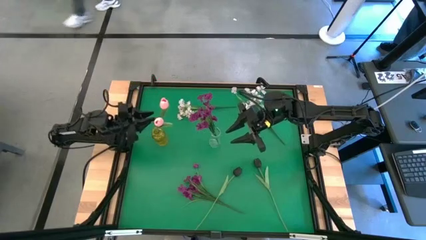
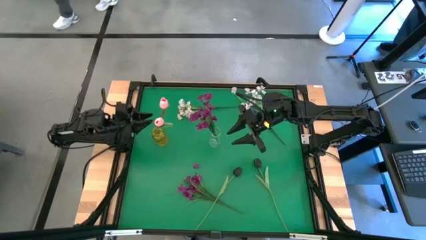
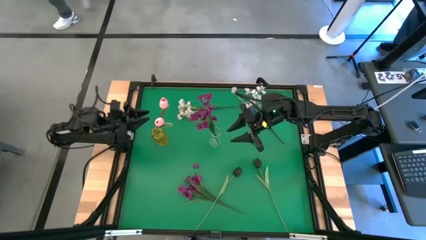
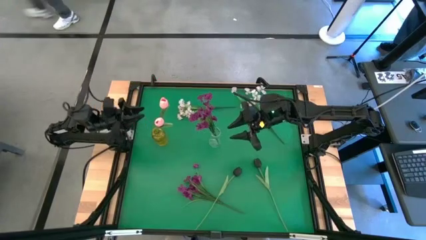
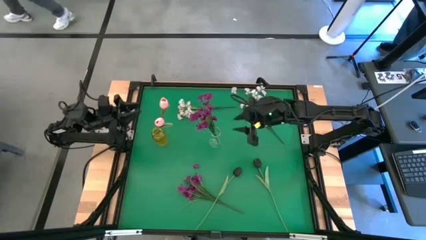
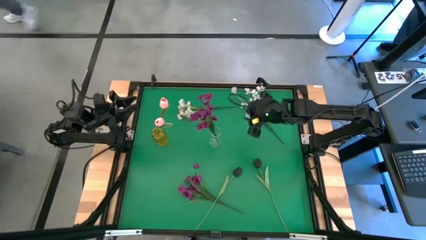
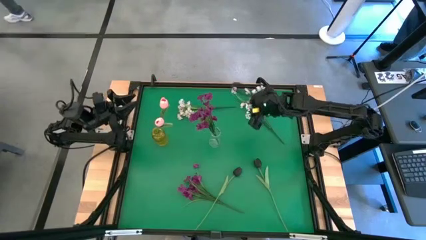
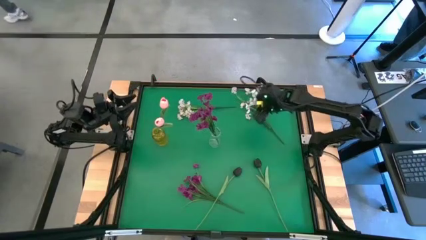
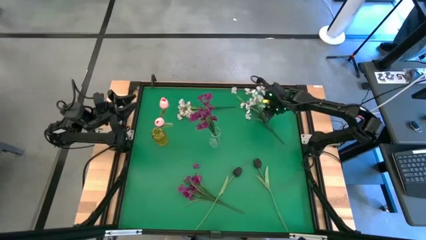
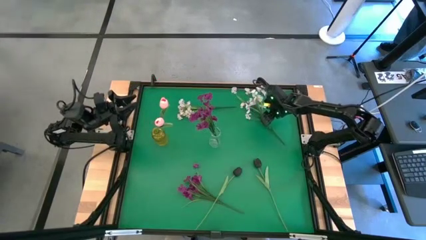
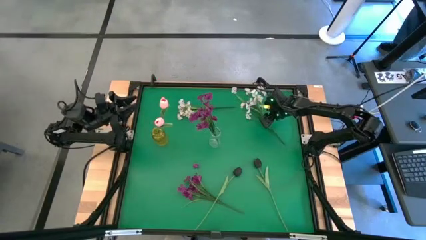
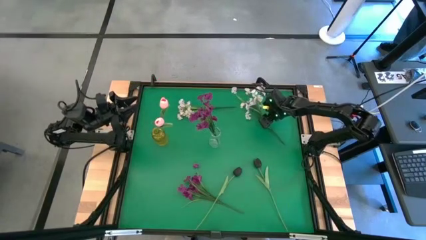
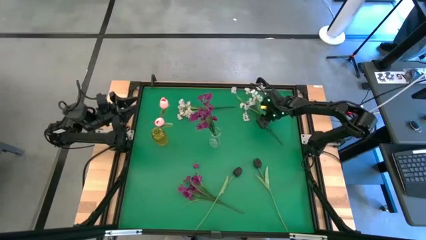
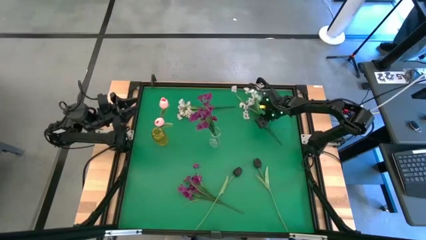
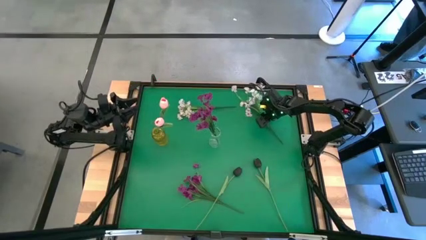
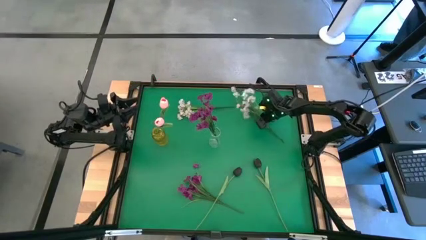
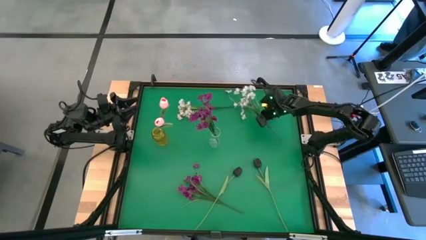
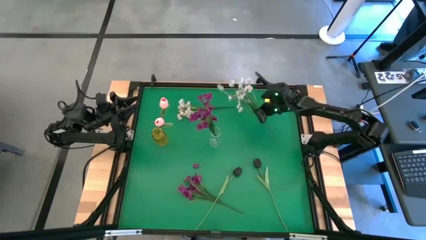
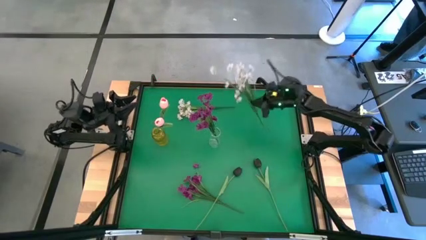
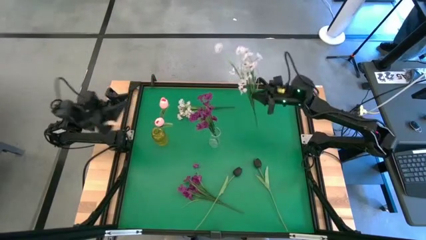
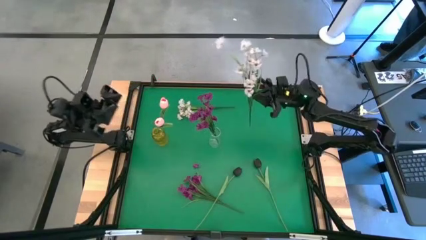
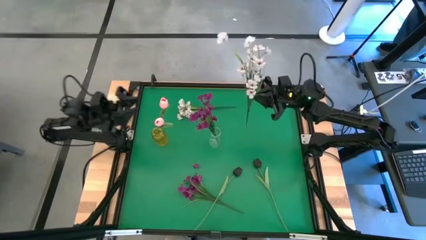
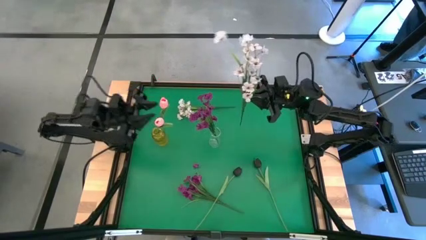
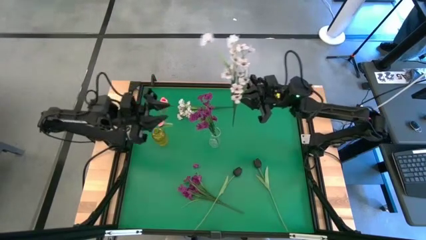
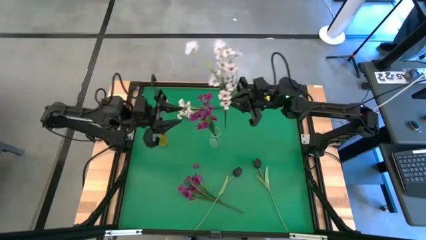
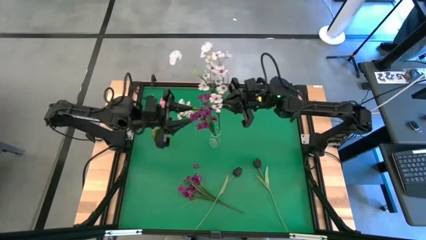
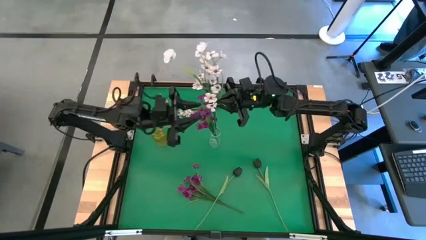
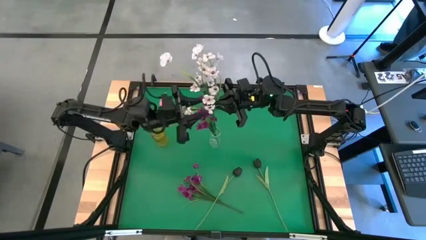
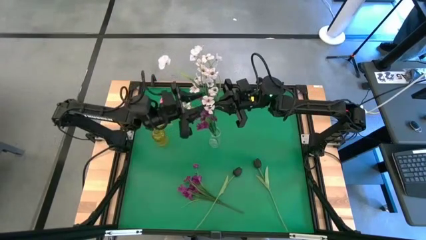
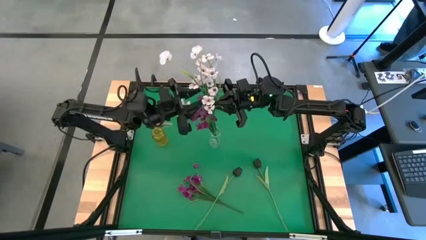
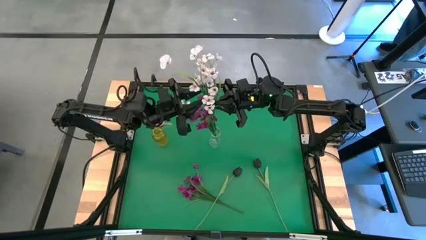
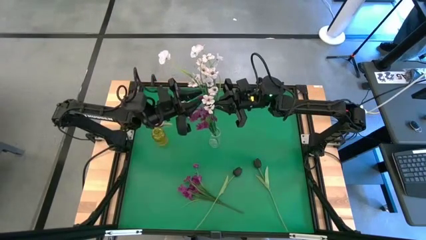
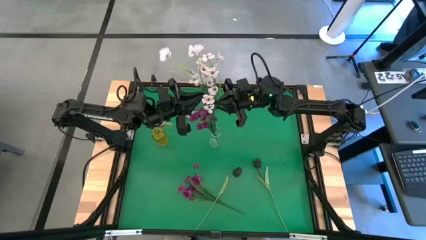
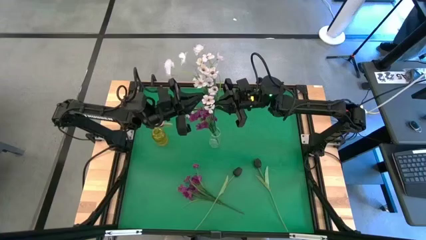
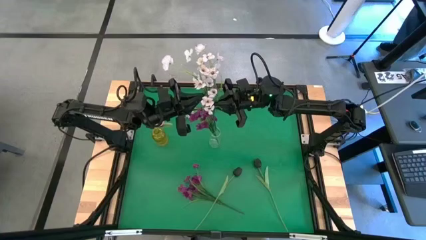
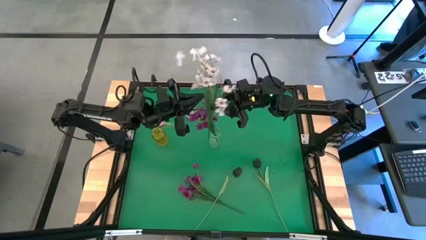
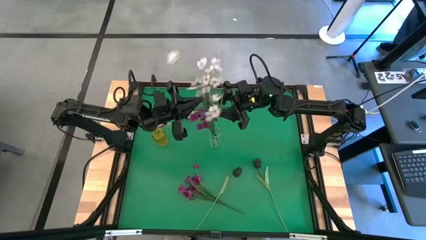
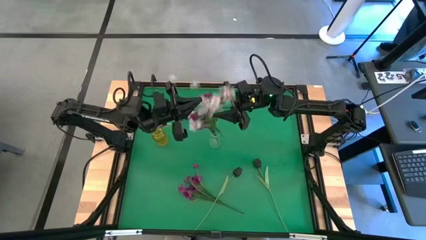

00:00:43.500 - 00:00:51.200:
Task: Sort flowers into vase by color
Put the right white flowers into the yellow vase

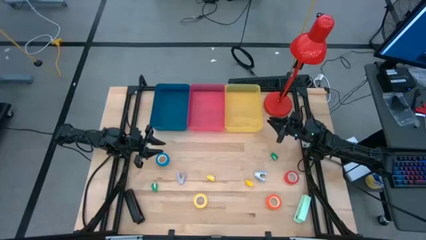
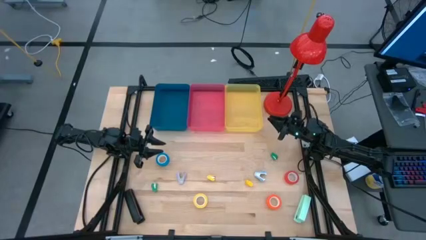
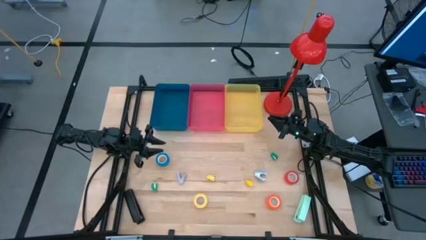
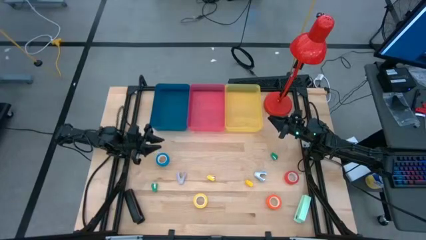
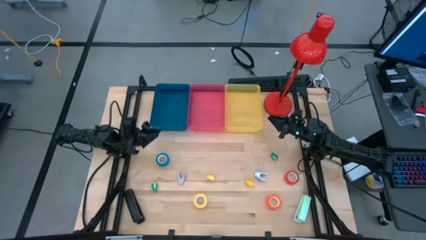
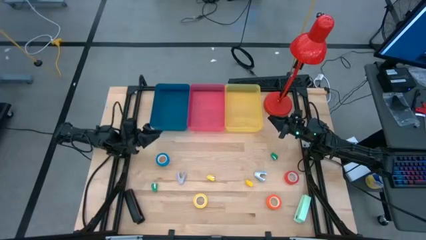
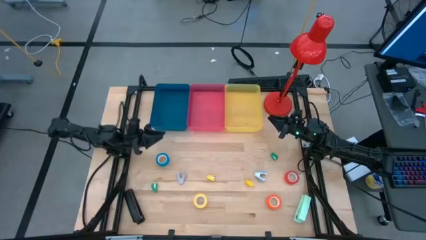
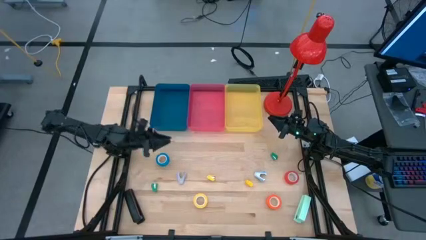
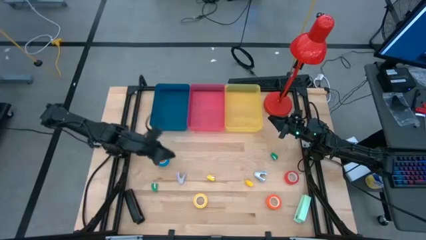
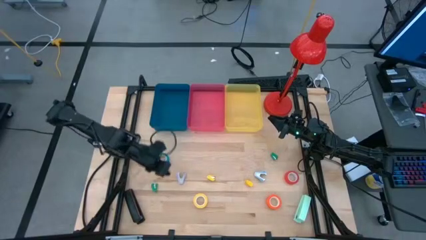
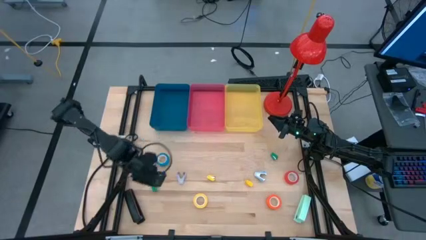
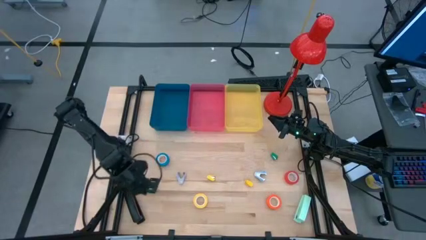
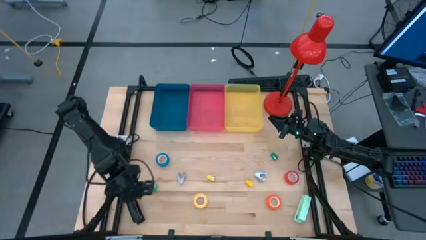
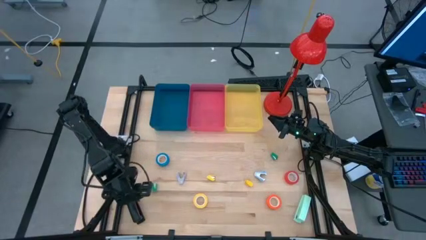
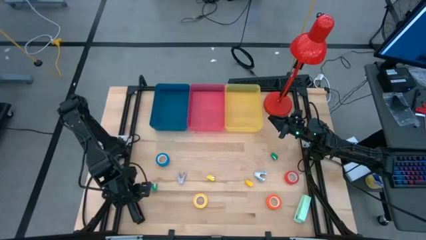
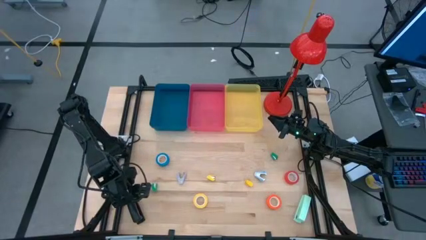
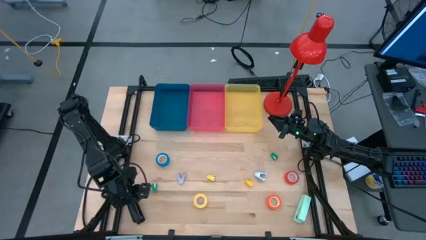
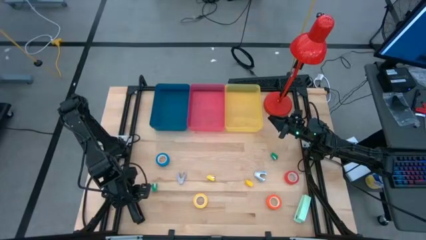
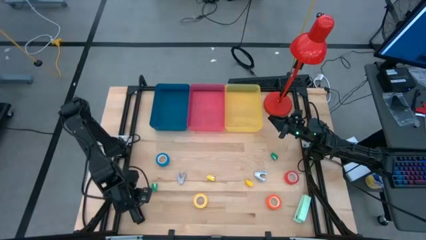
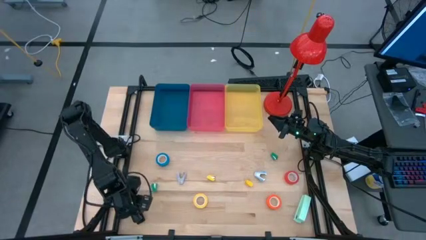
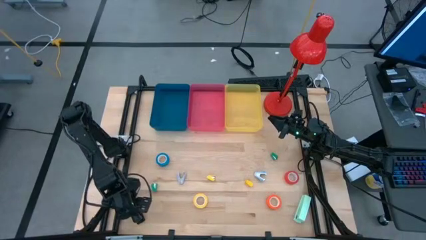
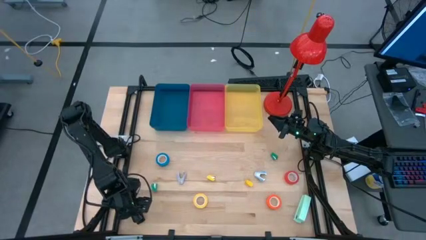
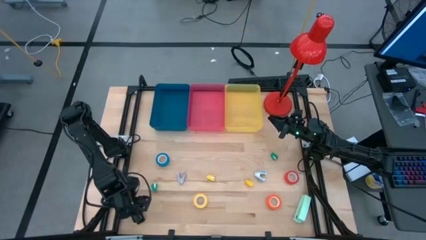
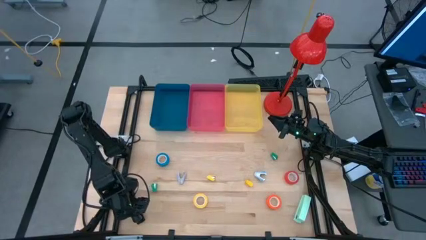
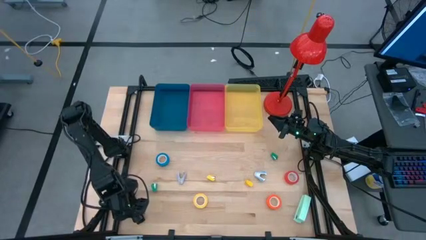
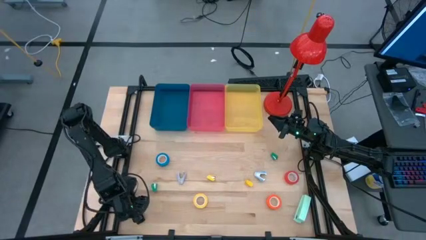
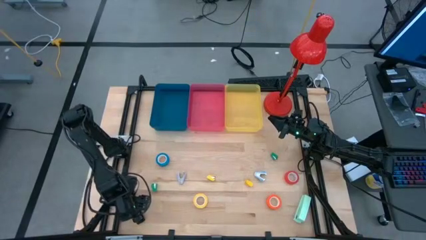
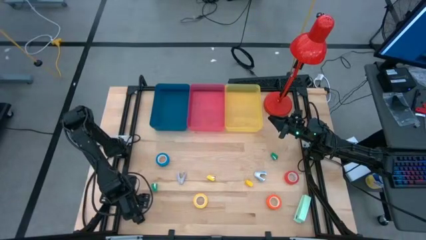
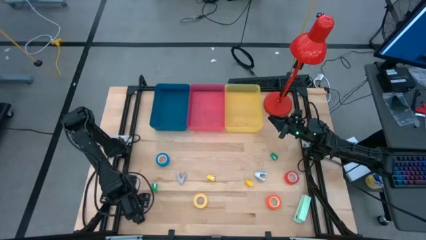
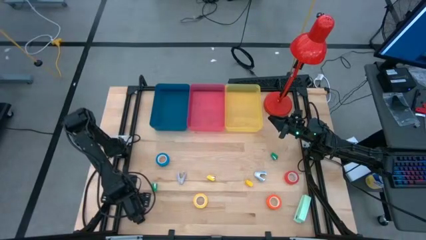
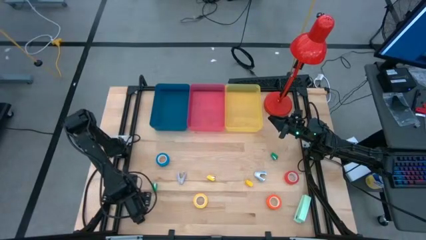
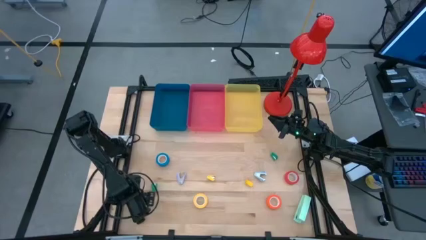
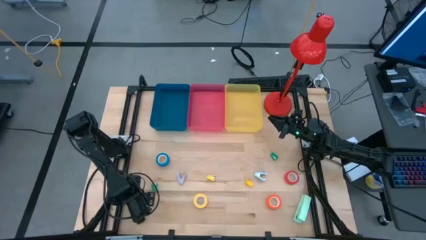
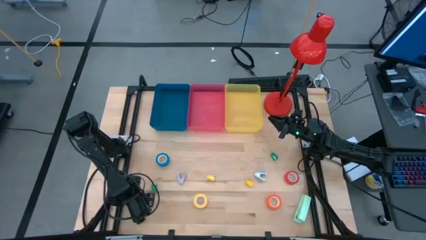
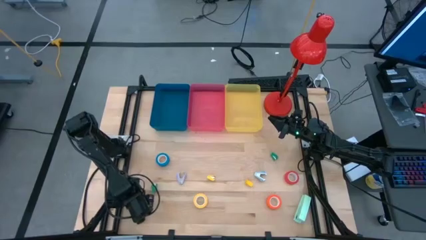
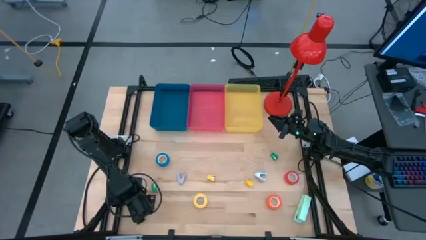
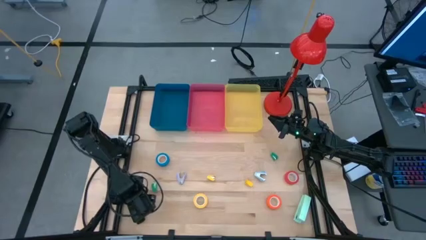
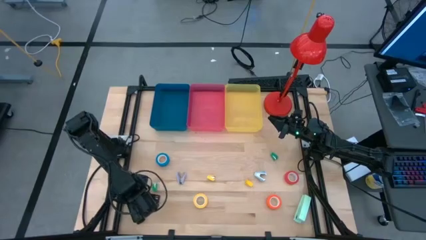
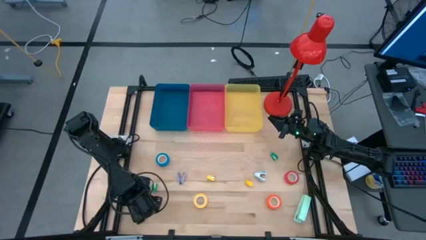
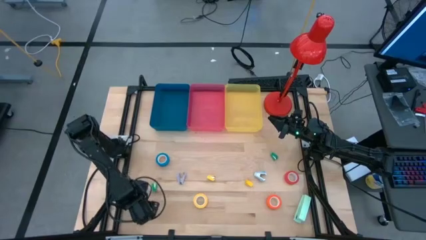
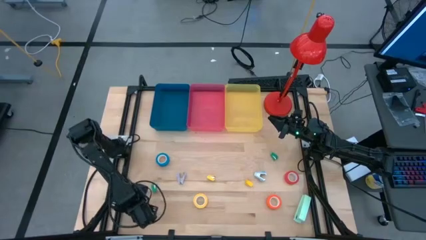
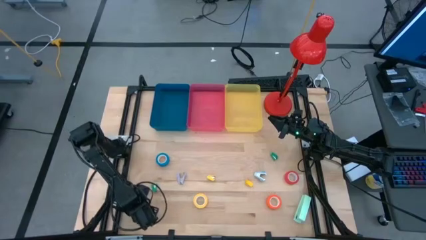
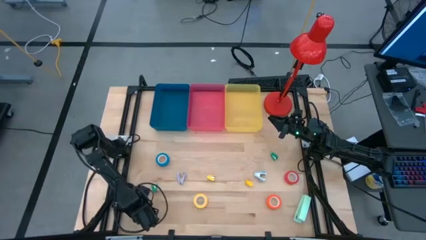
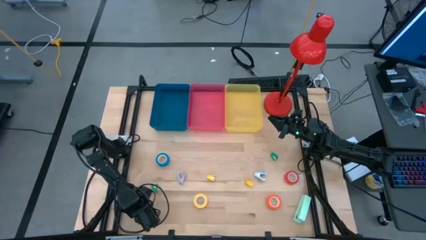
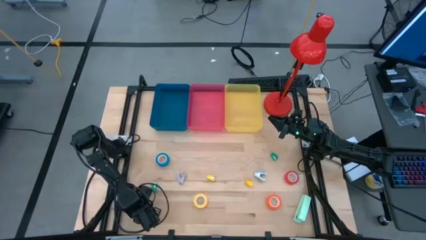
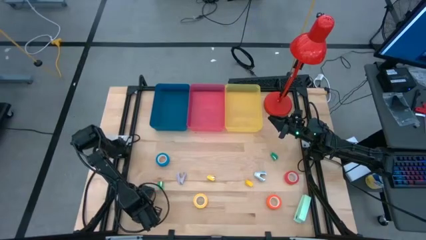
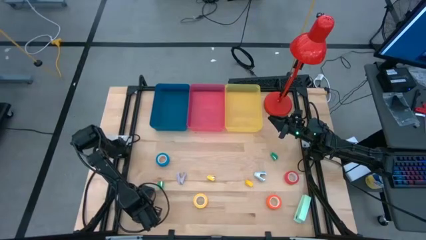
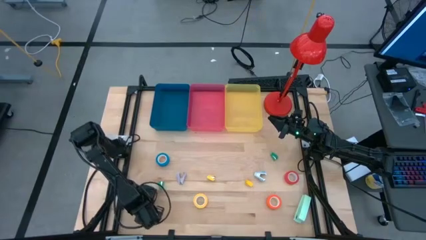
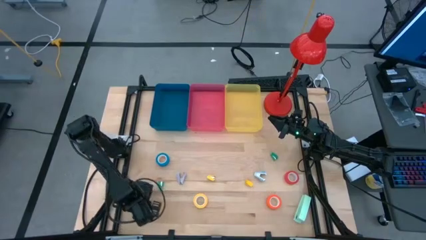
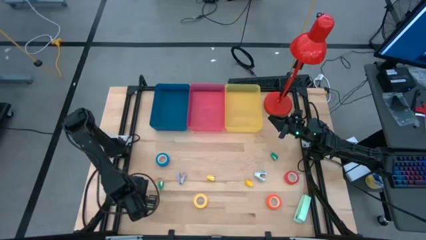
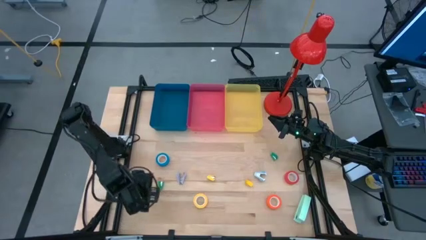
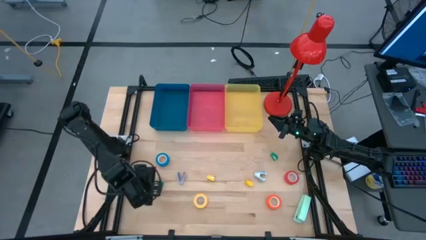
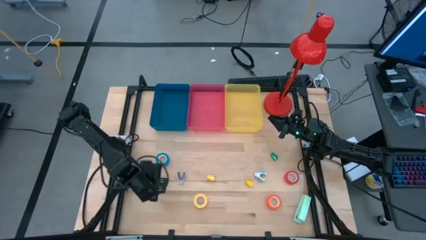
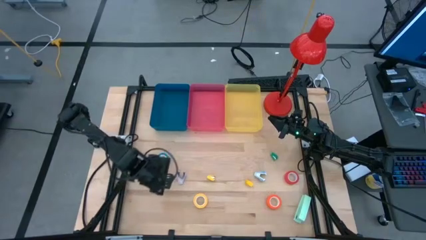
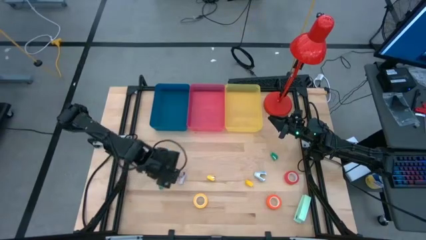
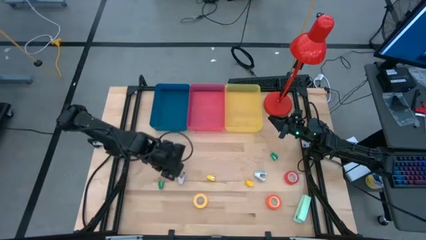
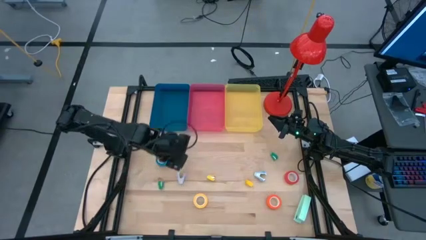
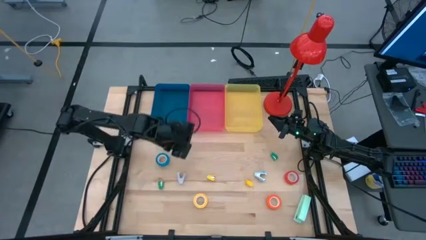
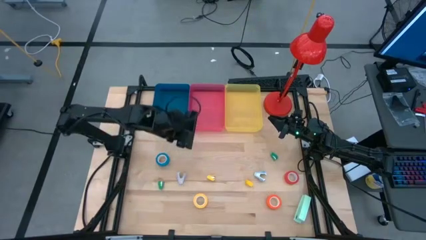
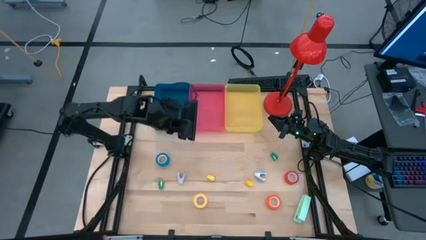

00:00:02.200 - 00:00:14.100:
Task: Pick and place Stapler, Stapler remover, tape
Put the large black stapler into the yellow bin
